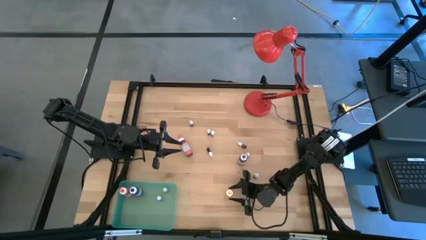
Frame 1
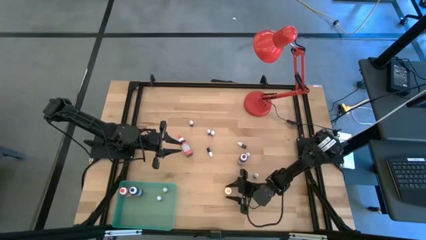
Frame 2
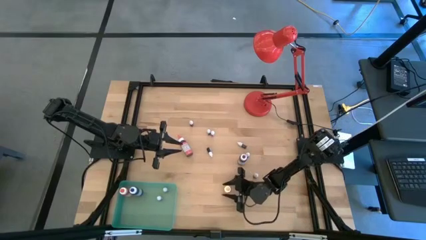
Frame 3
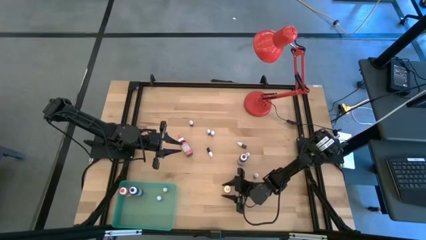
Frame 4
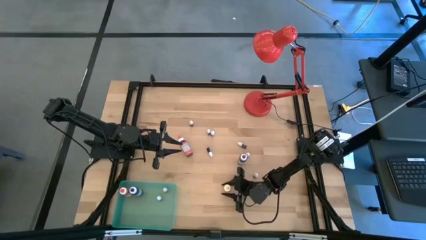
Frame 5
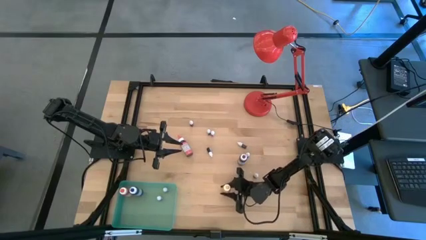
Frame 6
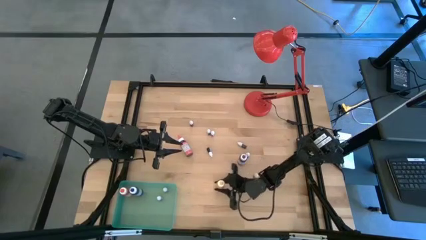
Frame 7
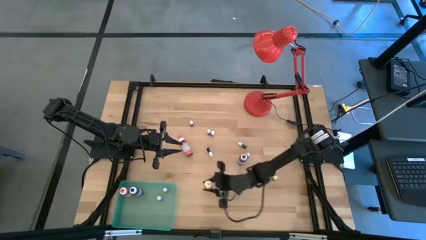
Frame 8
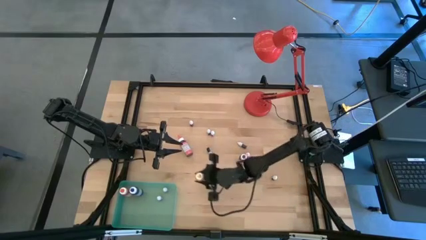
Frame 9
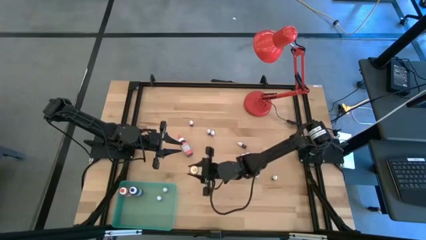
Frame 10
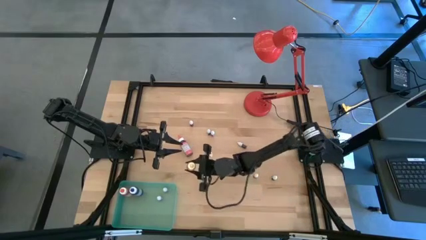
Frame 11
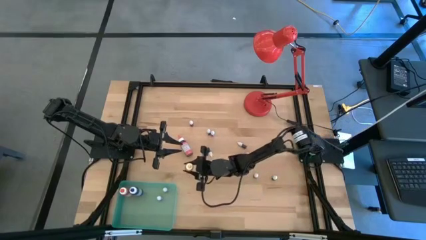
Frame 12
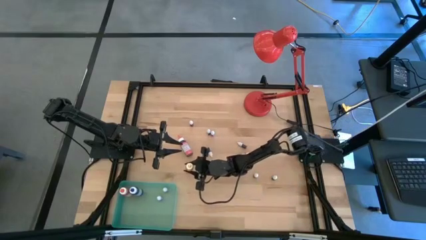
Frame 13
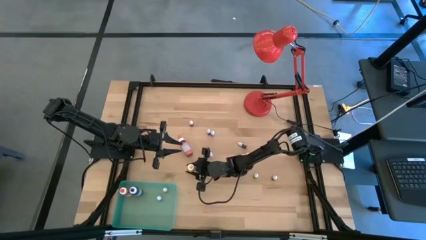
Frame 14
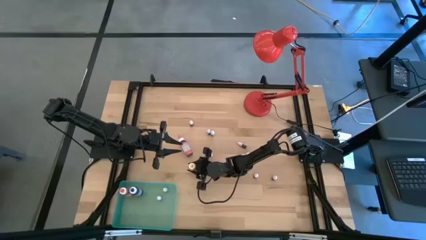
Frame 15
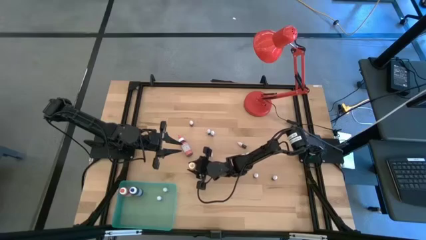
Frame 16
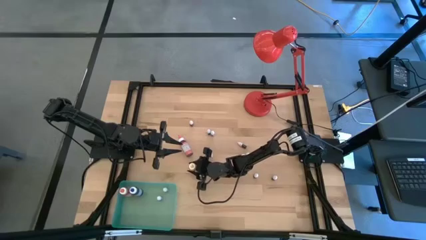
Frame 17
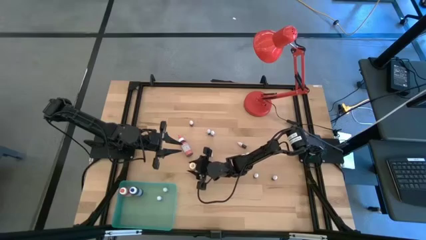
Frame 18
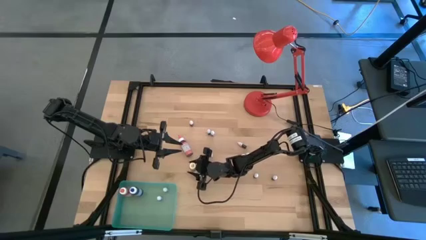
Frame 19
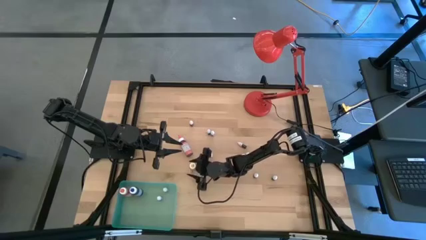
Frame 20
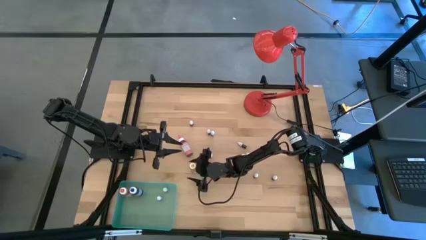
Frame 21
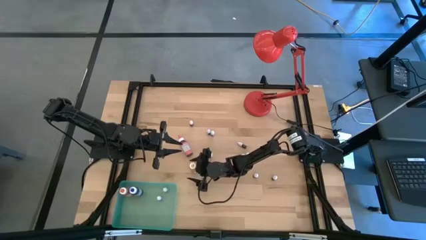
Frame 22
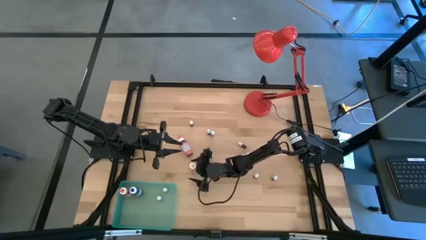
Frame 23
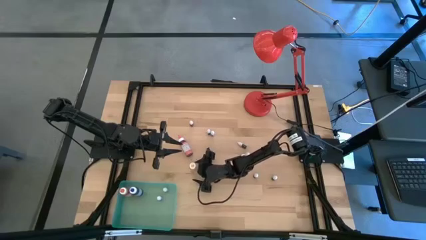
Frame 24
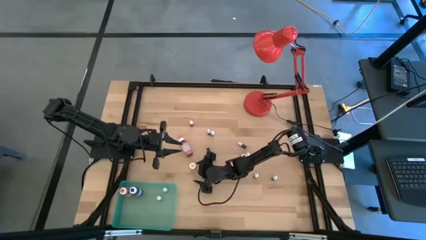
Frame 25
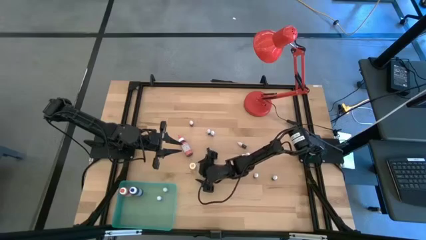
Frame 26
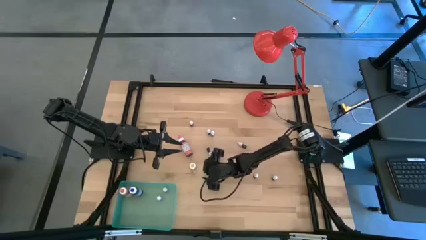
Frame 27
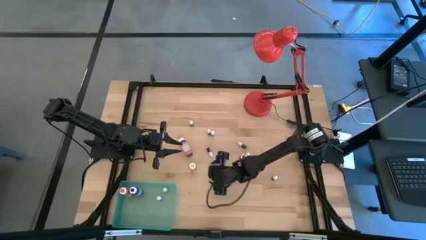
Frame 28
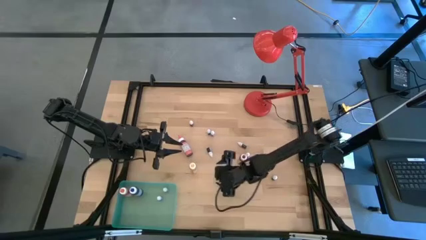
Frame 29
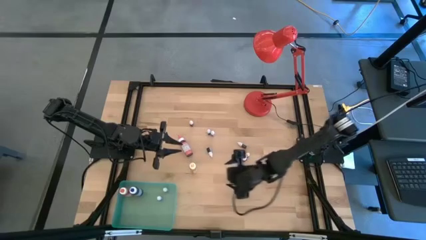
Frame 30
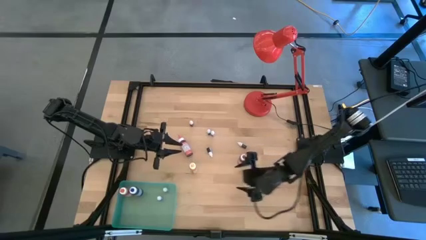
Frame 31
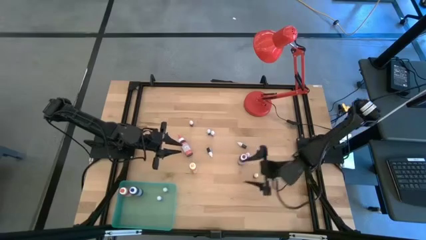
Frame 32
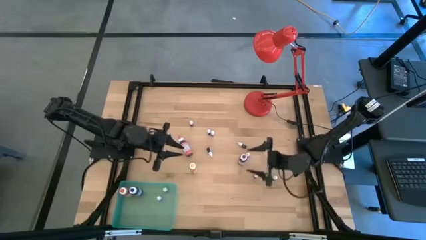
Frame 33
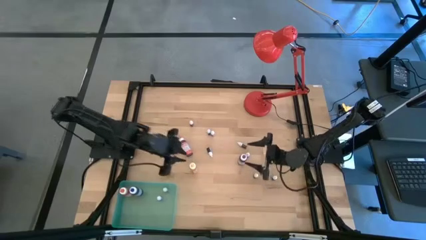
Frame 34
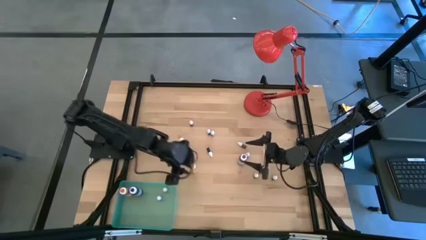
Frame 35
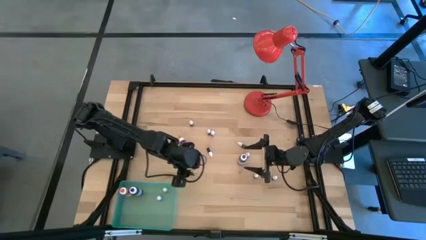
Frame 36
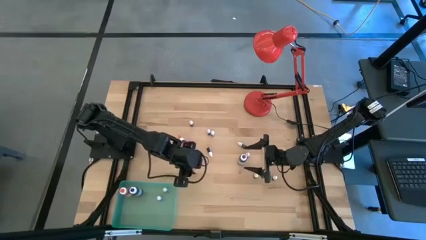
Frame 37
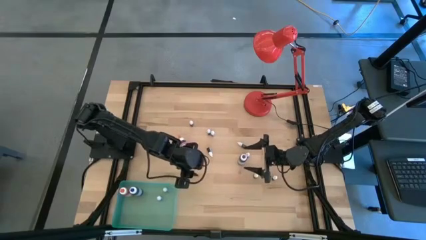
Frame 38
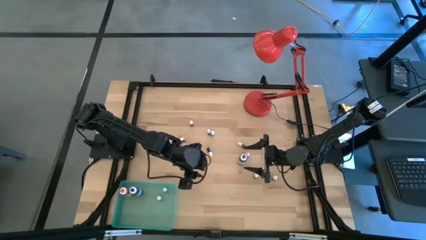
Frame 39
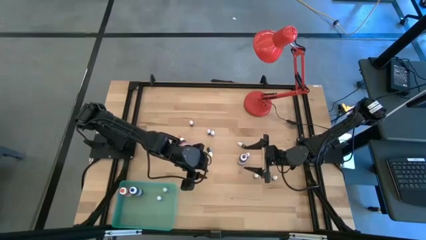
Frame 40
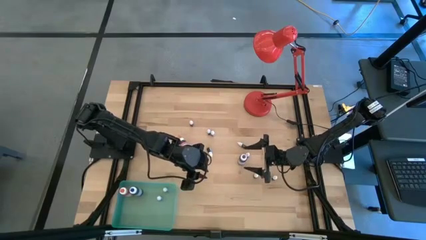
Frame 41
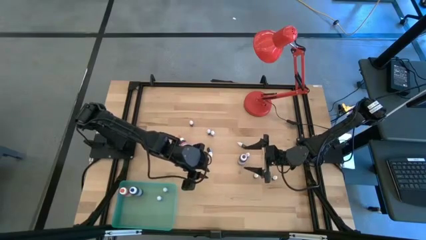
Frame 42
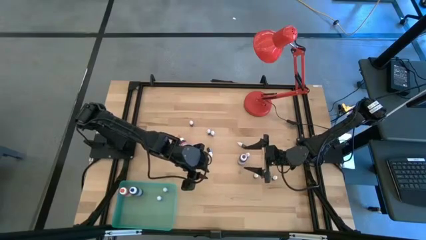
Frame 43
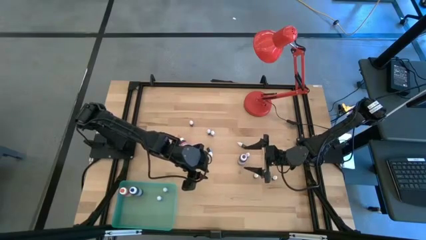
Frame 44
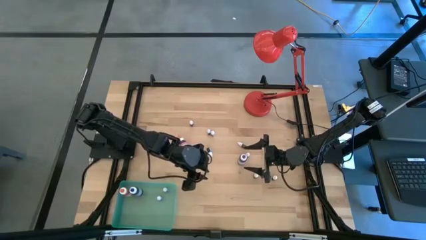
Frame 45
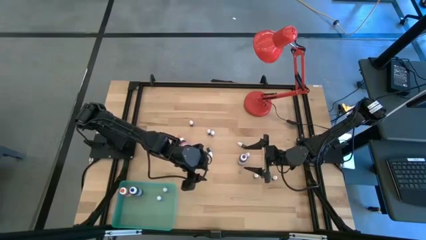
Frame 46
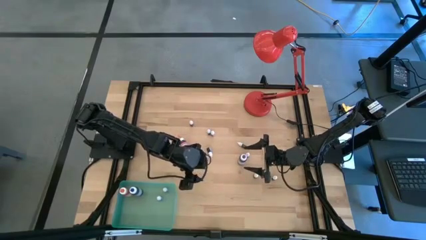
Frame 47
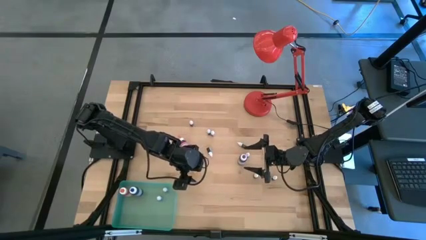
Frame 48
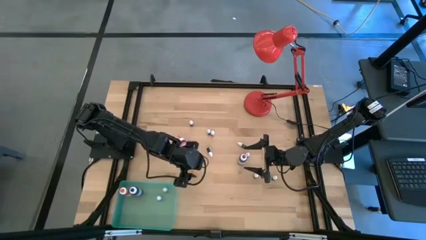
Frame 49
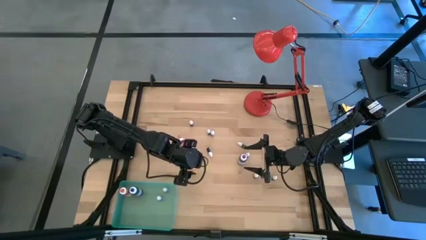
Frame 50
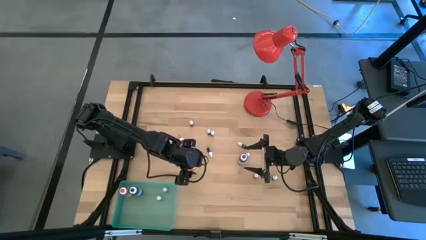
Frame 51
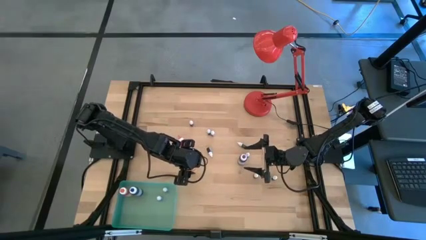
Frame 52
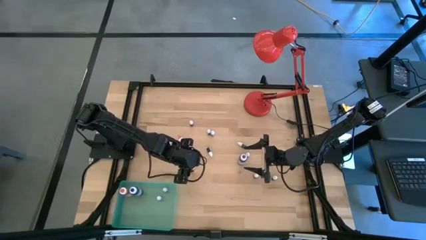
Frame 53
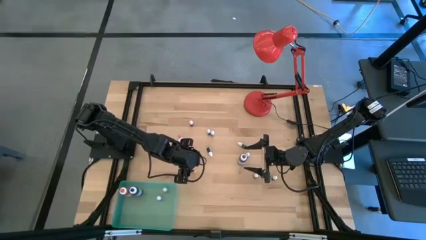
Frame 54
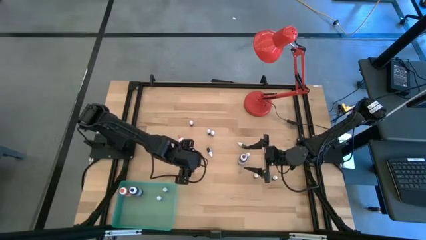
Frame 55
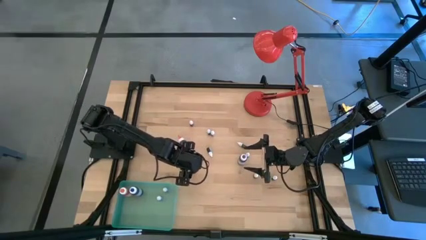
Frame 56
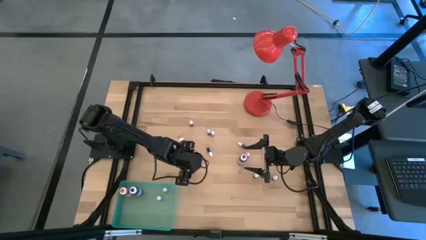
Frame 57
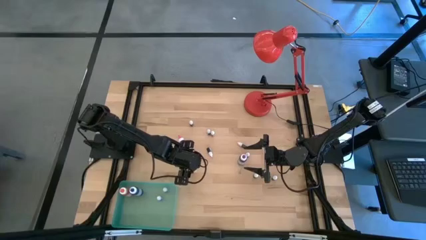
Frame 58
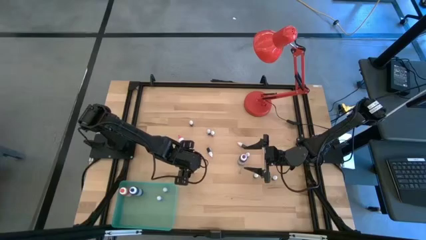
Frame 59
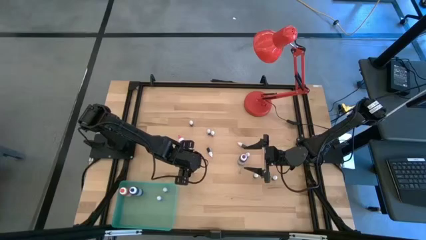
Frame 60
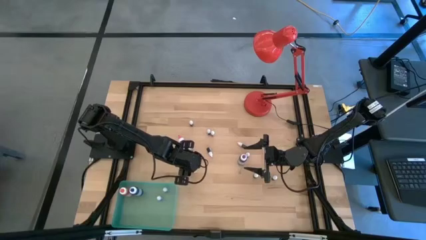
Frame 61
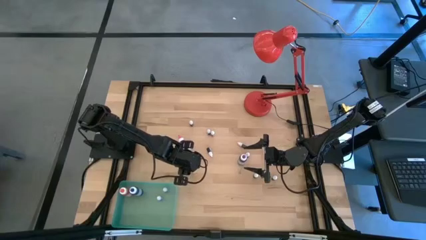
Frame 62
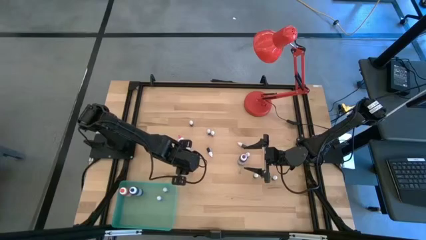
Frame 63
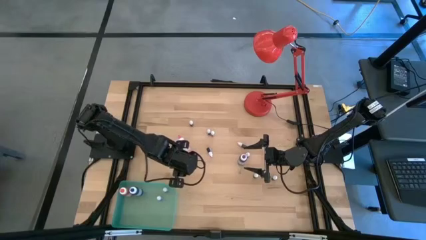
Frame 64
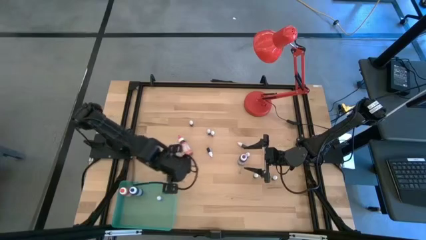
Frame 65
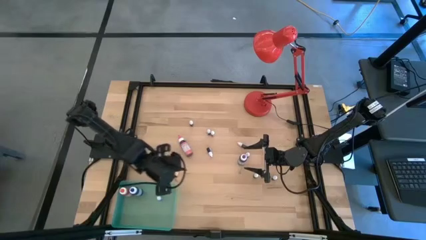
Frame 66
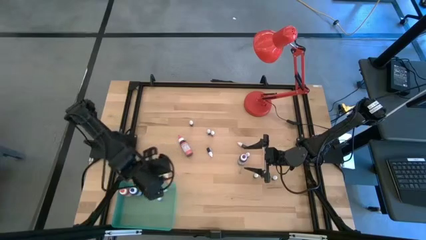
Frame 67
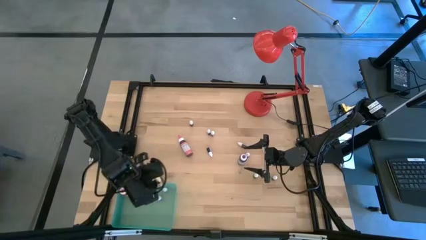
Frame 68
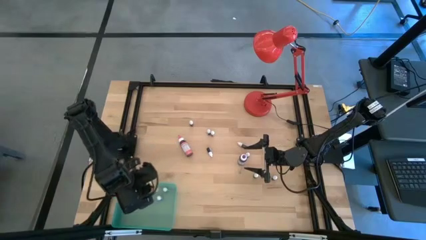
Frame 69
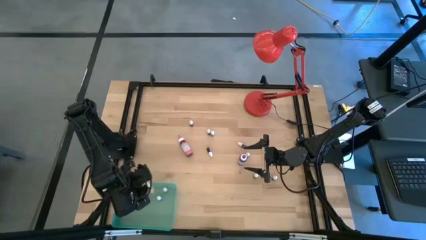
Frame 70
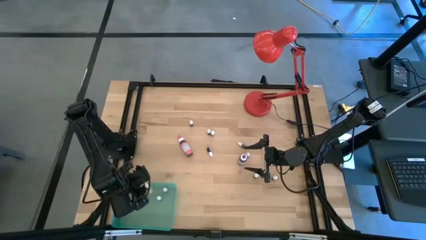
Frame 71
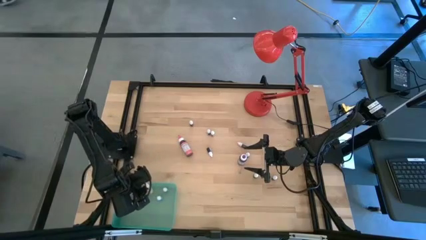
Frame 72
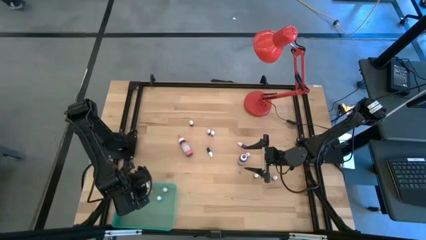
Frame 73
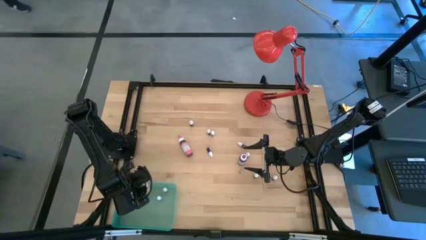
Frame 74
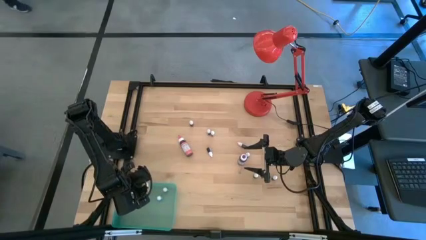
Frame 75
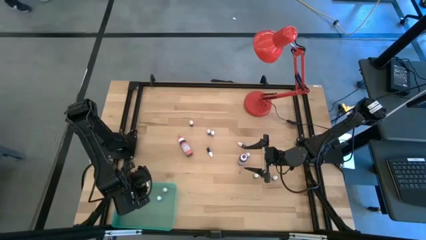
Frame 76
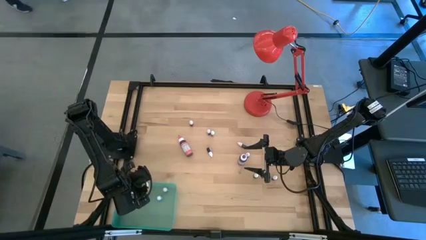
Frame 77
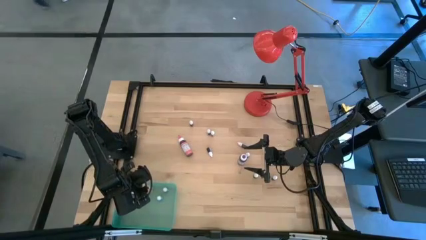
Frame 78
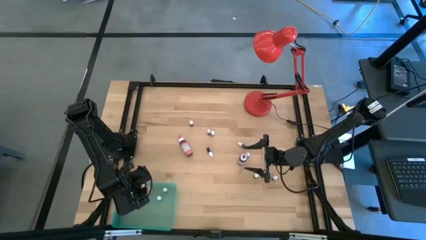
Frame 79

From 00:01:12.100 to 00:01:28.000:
Task: Pick & Place food coloring
Put the yellow food coloring into the blue bin
